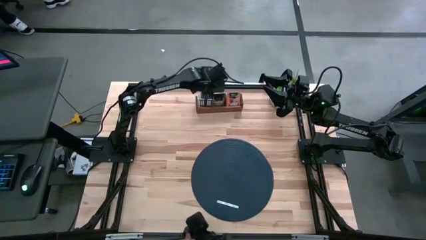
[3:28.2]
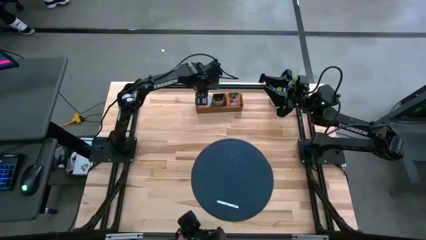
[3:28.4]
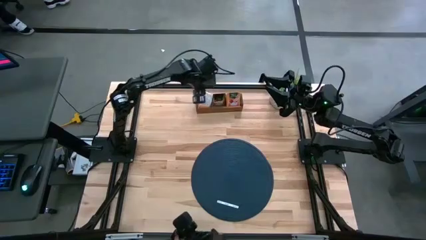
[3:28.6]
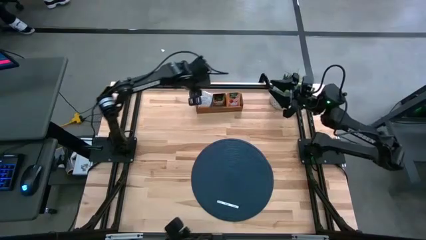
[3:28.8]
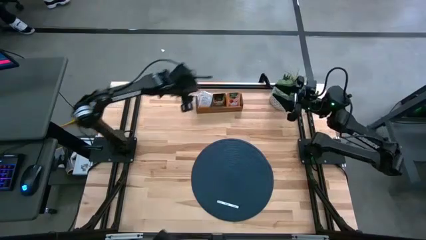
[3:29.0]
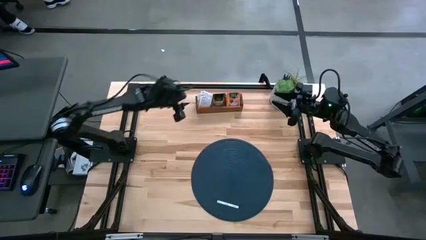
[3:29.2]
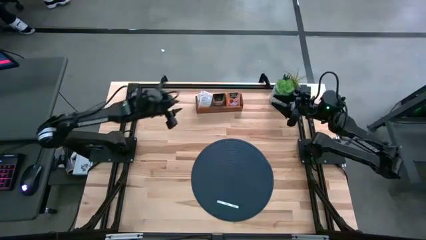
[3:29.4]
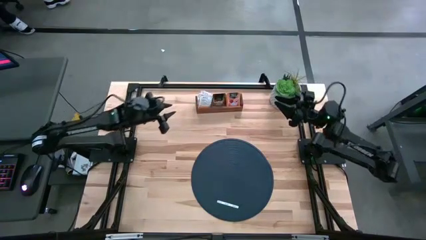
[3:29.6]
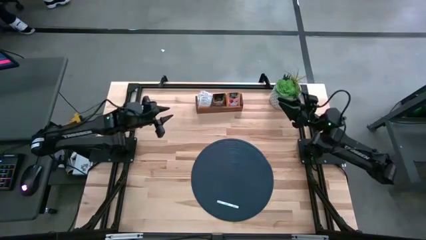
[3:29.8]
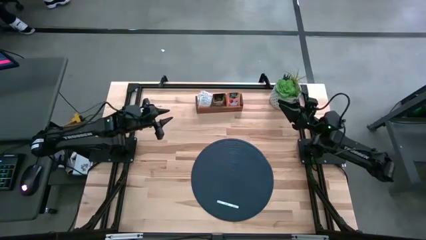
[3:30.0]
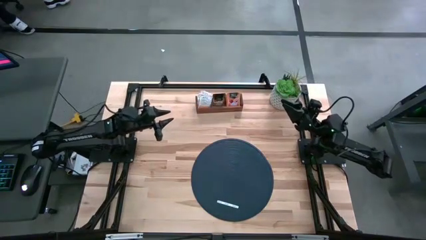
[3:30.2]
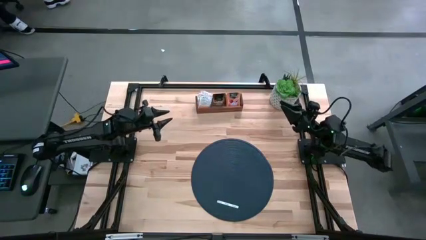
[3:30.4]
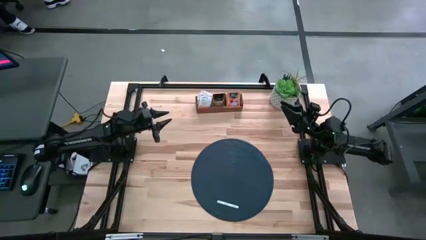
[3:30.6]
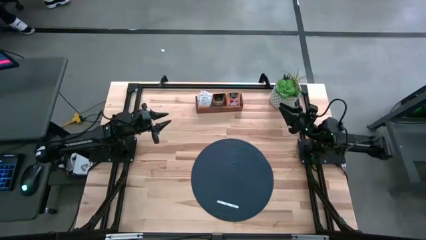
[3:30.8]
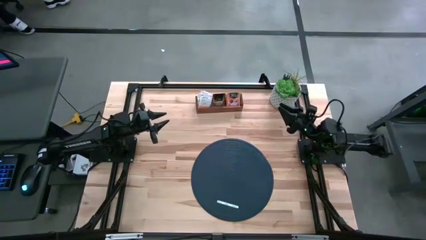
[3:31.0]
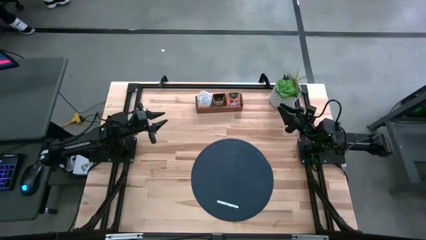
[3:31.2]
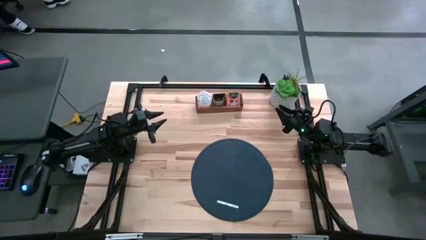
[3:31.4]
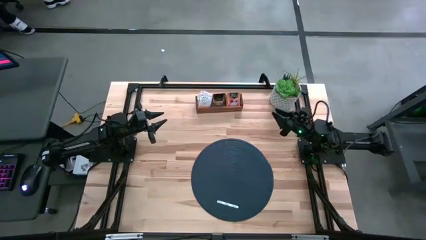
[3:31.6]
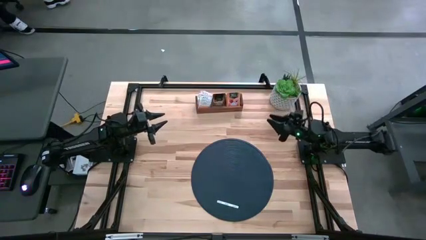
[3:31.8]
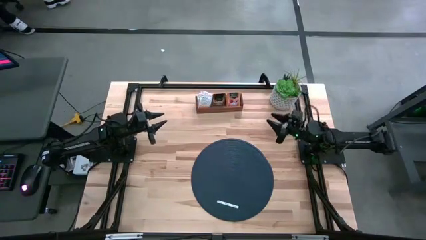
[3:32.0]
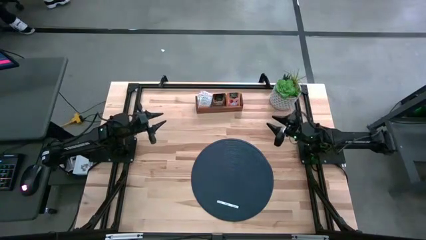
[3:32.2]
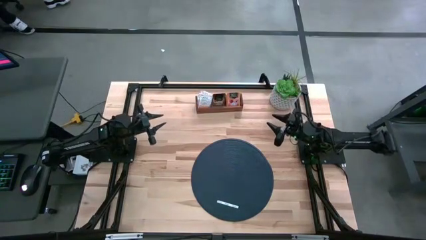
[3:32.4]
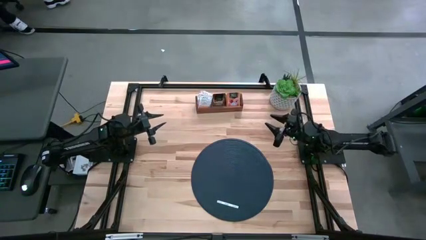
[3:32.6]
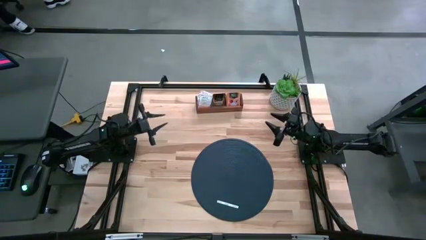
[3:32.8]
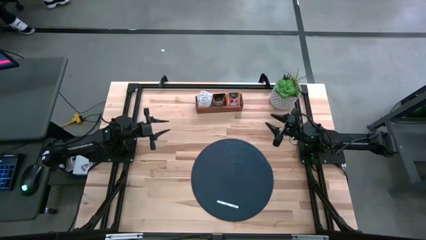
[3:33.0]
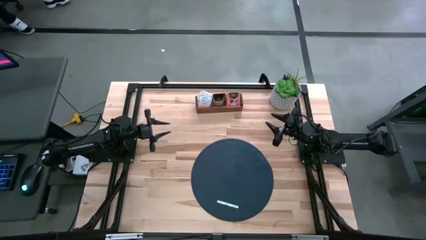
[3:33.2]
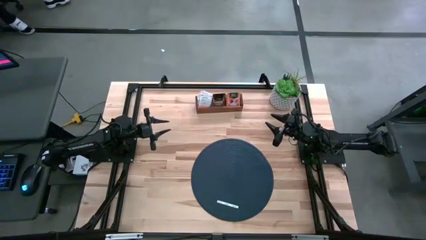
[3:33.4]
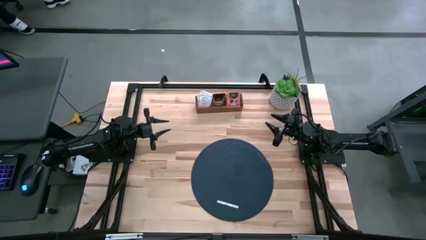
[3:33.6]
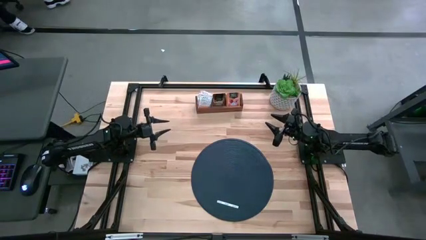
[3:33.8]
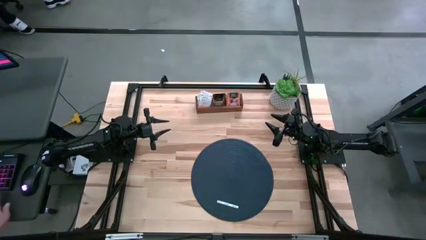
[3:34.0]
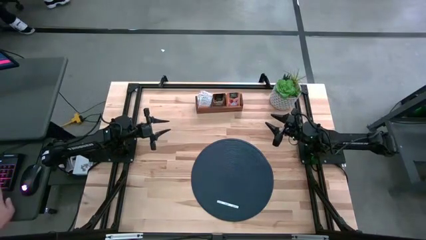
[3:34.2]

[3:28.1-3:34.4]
Task: Pick & Place Tea
Return to Home Position
